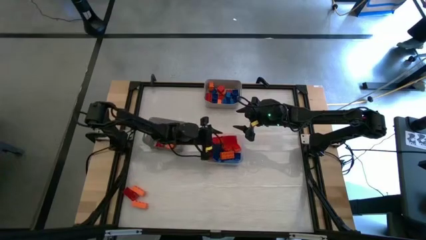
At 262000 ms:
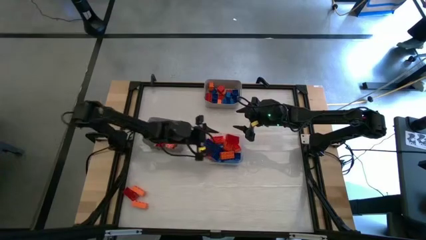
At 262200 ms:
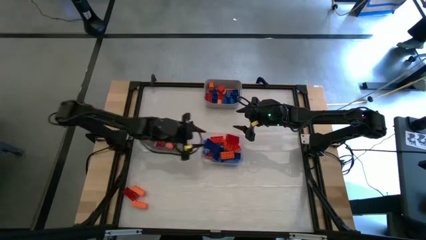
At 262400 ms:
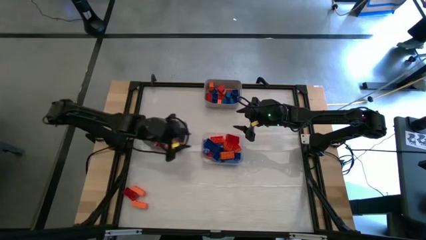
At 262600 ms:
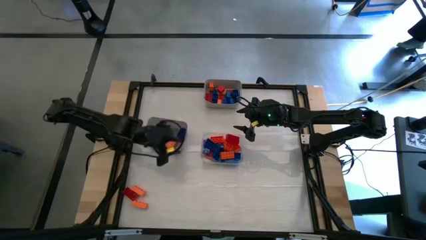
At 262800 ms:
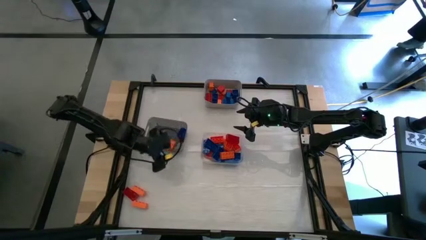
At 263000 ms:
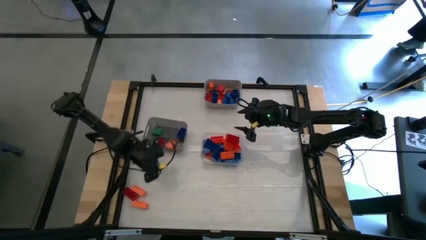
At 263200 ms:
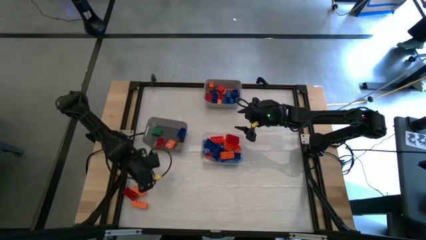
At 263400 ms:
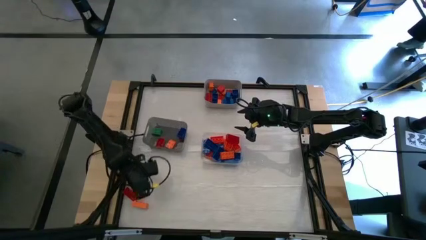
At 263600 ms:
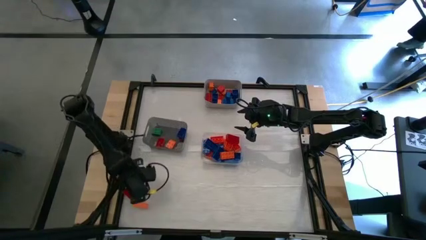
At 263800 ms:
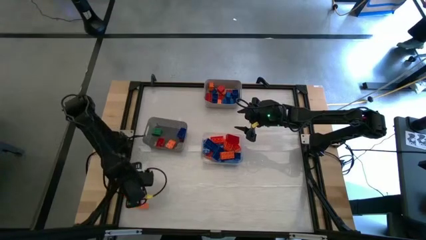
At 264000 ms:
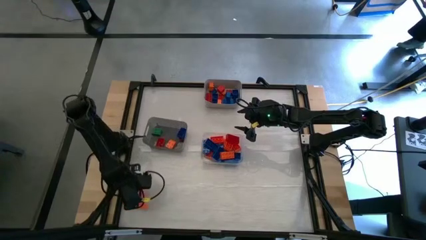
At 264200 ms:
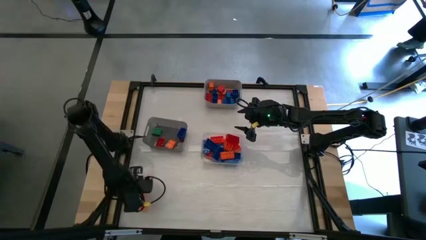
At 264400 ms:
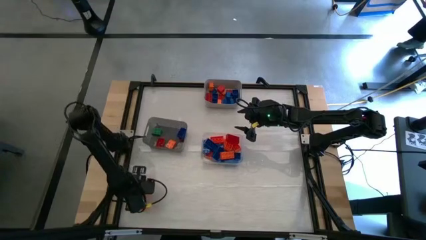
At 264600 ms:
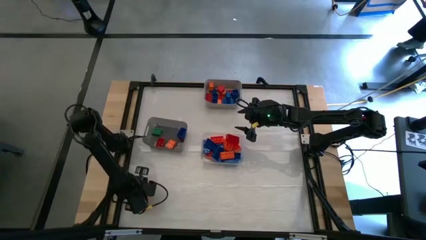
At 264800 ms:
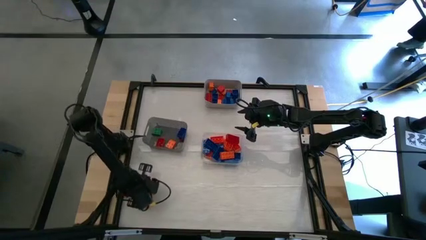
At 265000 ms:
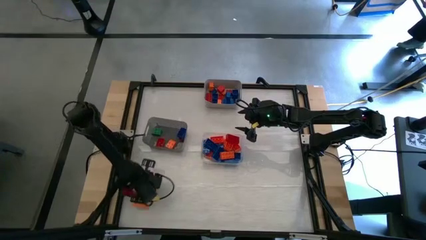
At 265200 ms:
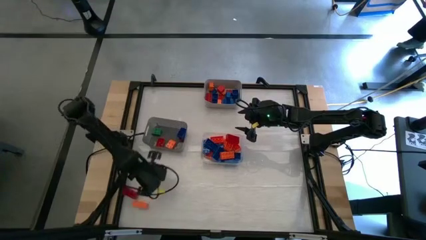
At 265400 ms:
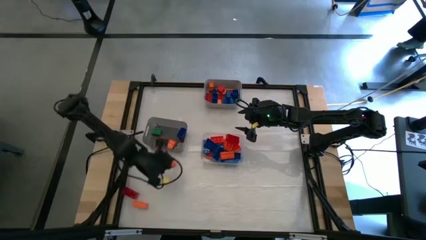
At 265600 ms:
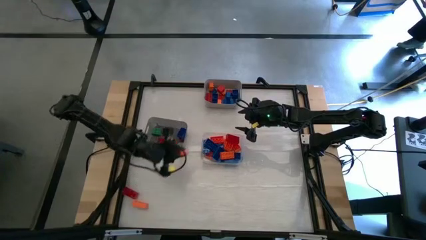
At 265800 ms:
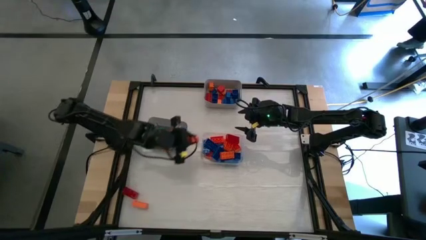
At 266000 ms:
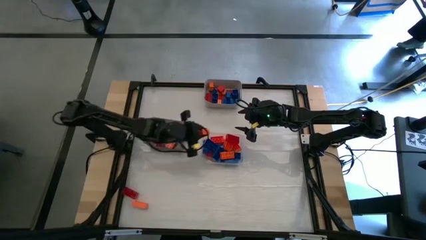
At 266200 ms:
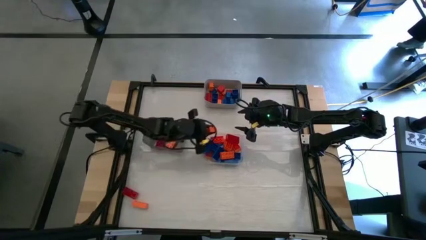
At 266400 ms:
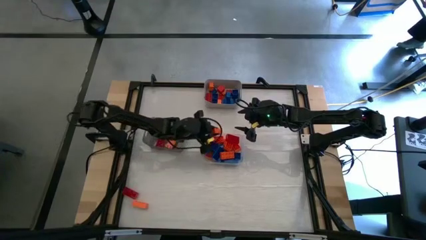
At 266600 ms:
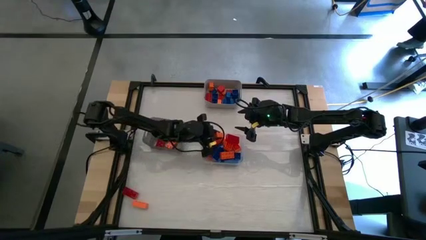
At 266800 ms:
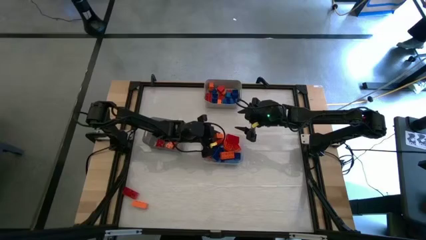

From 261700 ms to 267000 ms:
Task: Sort blocks by size
Put the big orange game piece into the transparent bin

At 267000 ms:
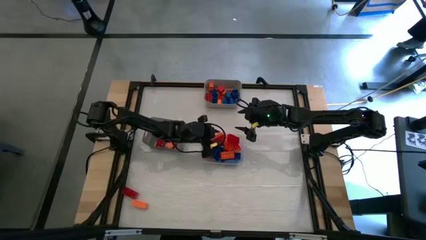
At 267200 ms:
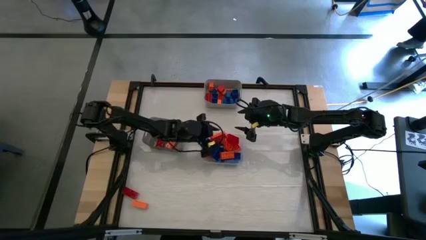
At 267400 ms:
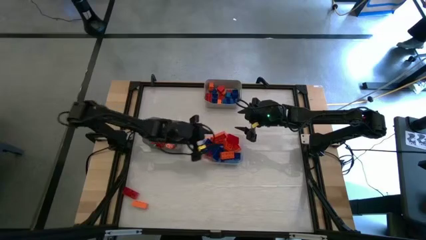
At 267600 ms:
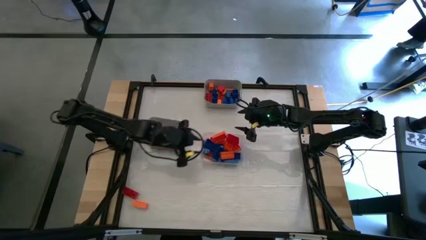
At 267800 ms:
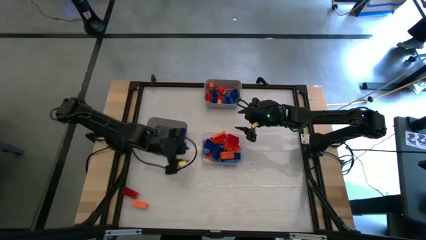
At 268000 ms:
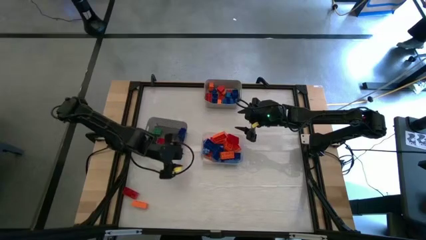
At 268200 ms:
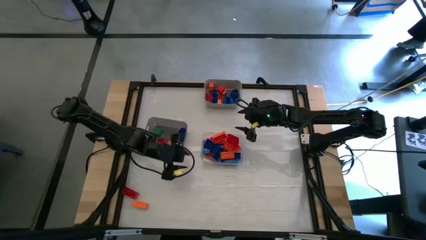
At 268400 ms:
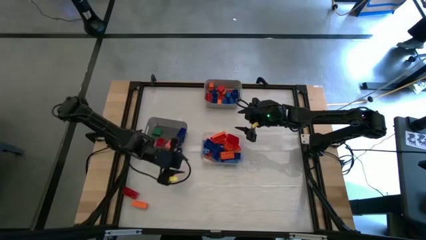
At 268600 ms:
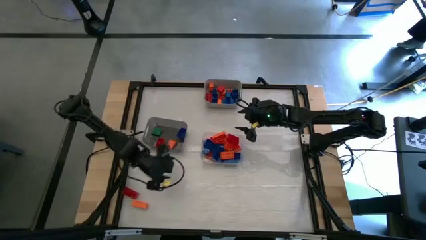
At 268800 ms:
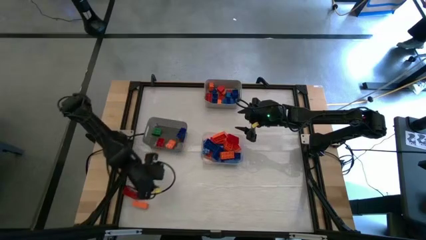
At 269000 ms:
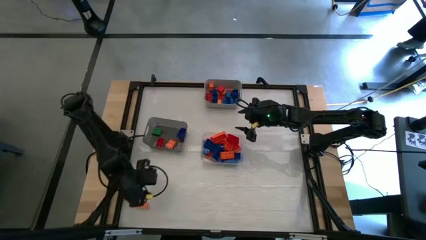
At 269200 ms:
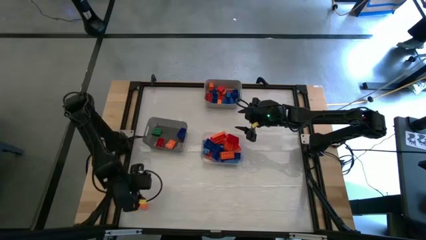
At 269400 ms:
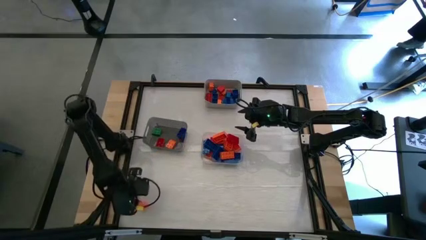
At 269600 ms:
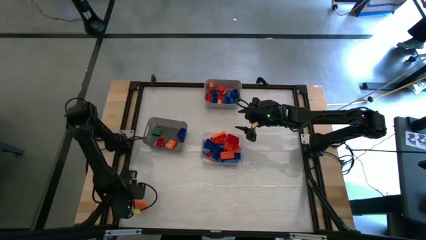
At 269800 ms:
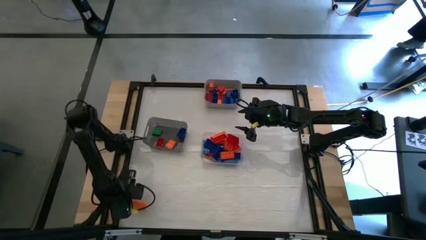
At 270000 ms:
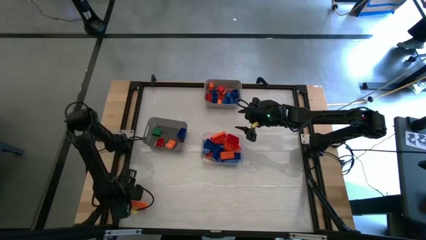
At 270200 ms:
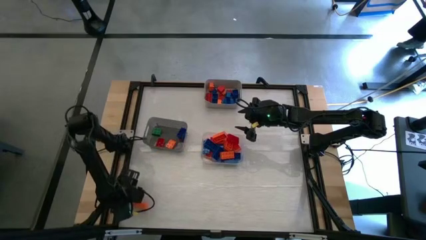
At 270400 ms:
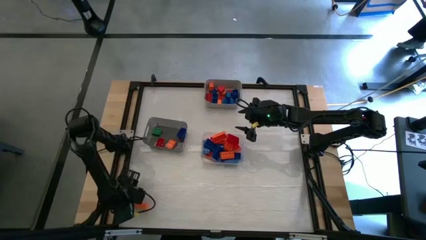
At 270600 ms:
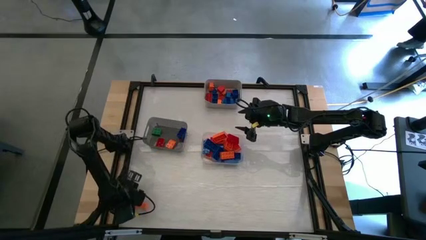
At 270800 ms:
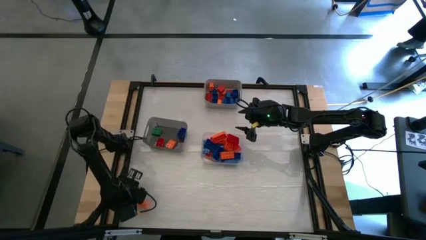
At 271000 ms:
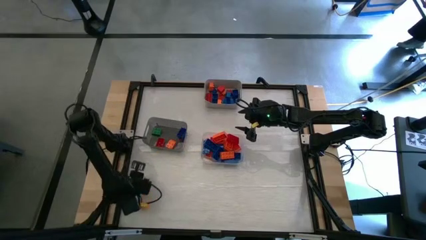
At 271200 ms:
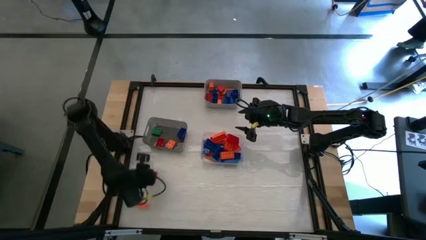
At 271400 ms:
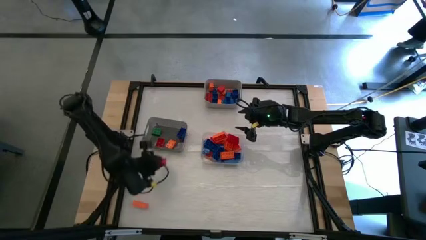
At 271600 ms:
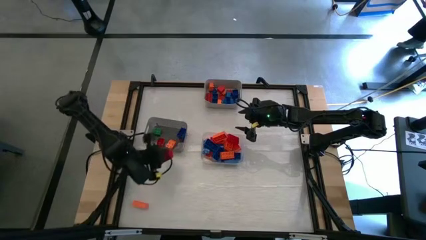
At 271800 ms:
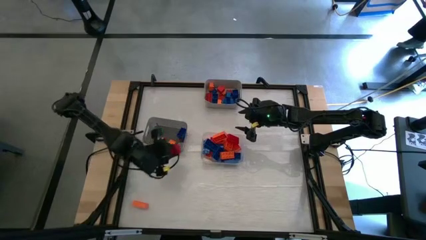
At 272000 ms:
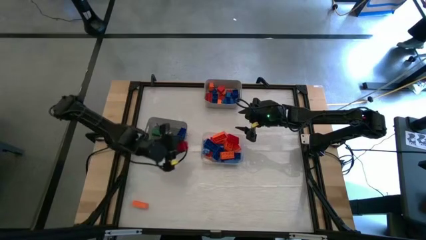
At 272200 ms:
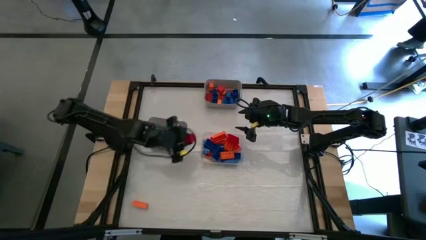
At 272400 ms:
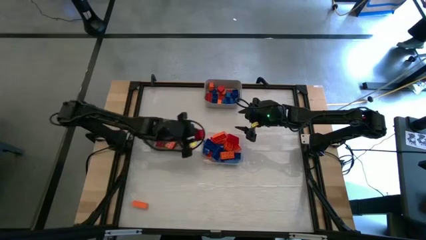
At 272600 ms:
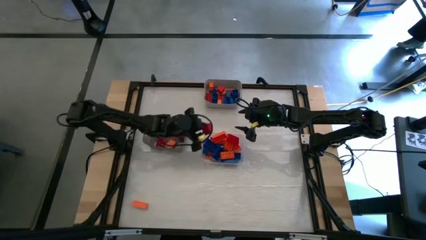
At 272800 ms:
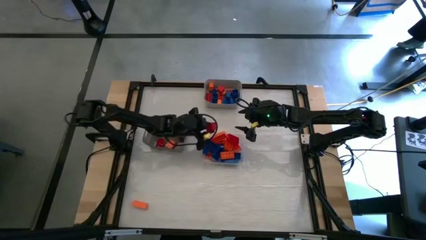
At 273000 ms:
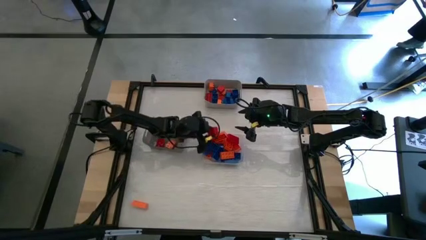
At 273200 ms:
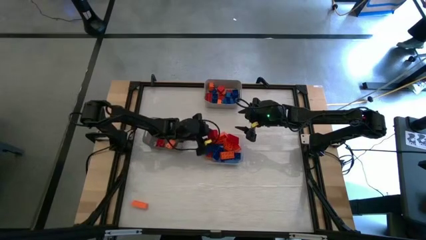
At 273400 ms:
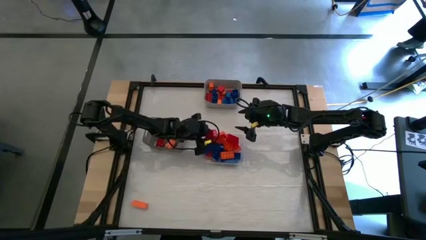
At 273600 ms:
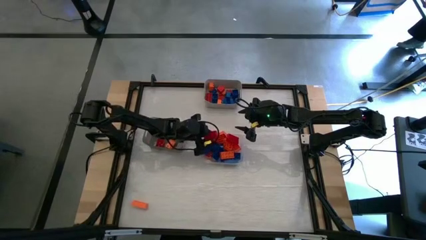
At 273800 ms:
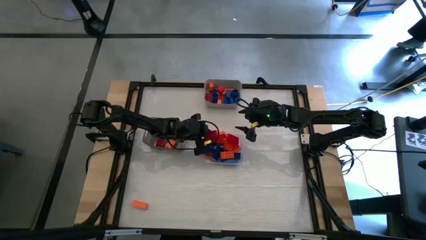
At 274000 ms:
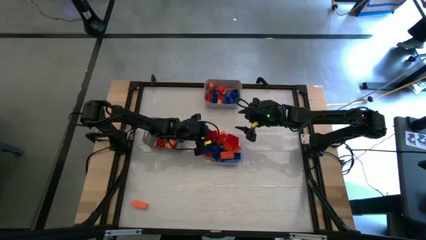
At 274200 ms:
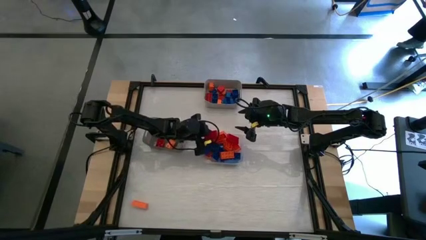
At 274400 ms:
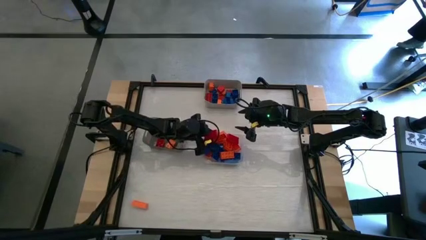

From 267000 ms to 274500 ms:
Put the big red game piece into the transparent bin

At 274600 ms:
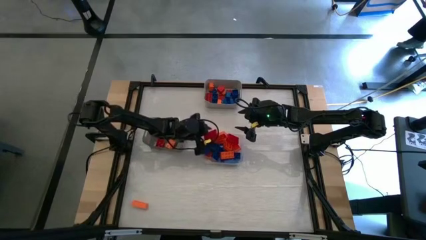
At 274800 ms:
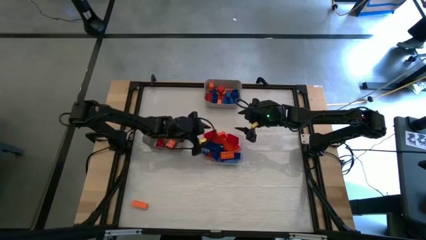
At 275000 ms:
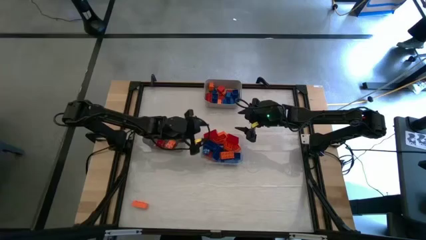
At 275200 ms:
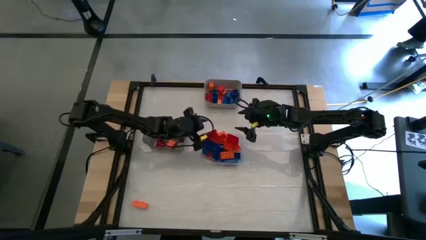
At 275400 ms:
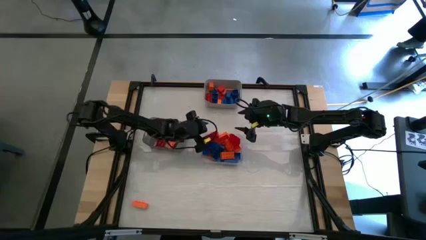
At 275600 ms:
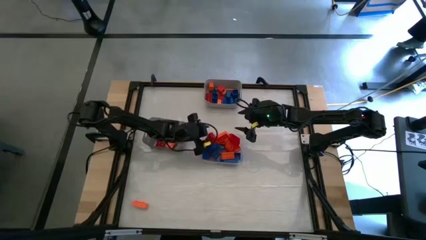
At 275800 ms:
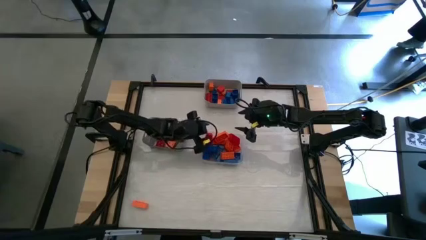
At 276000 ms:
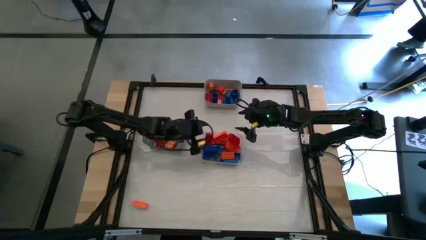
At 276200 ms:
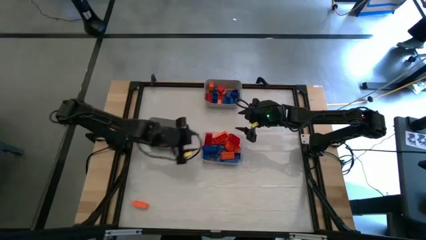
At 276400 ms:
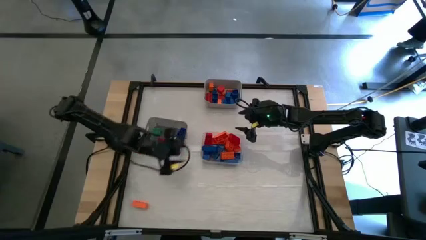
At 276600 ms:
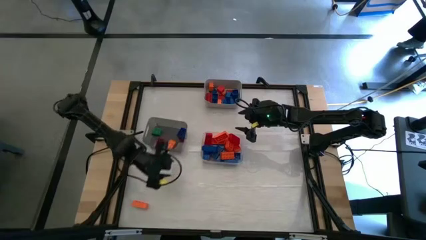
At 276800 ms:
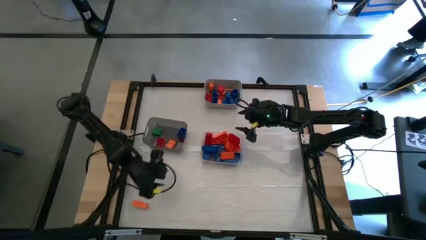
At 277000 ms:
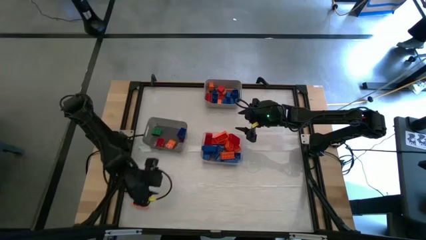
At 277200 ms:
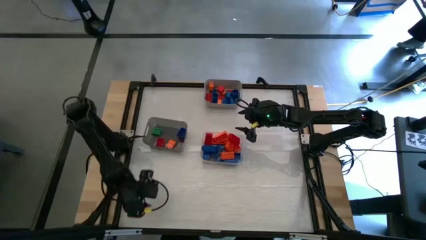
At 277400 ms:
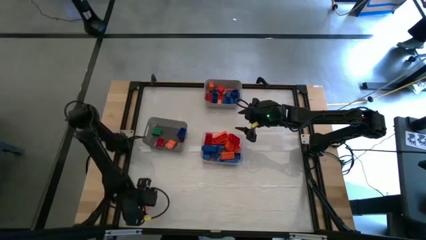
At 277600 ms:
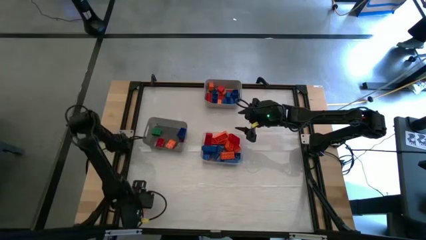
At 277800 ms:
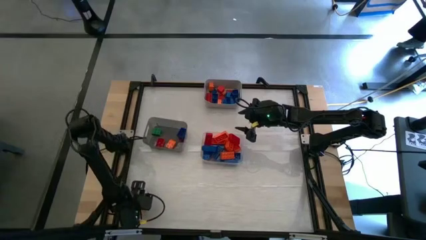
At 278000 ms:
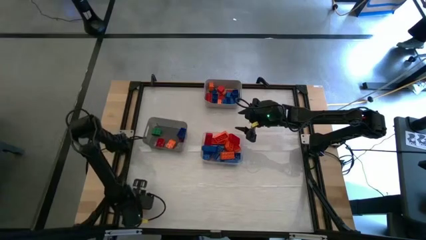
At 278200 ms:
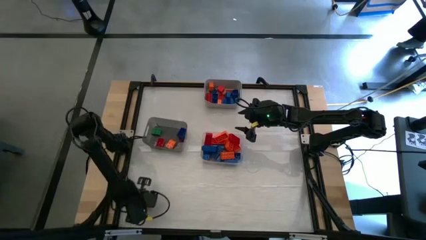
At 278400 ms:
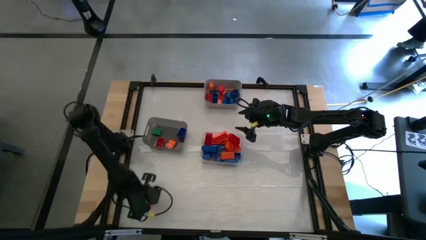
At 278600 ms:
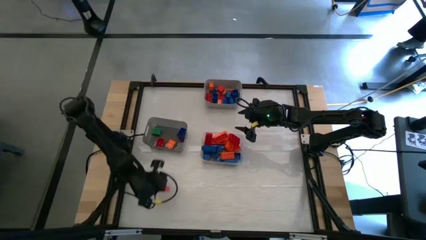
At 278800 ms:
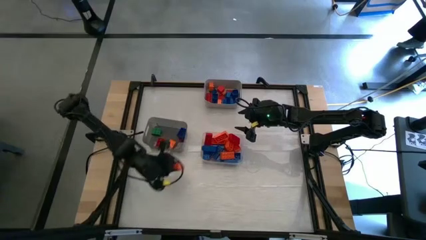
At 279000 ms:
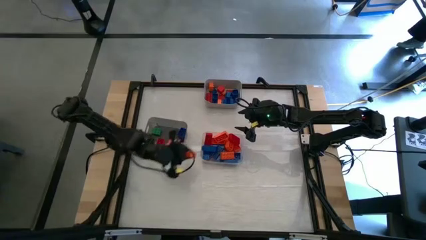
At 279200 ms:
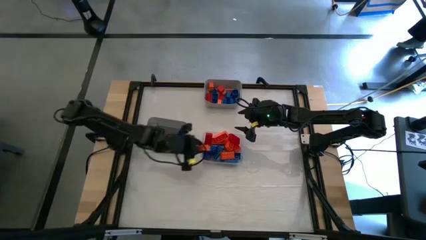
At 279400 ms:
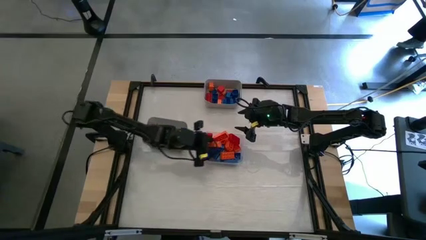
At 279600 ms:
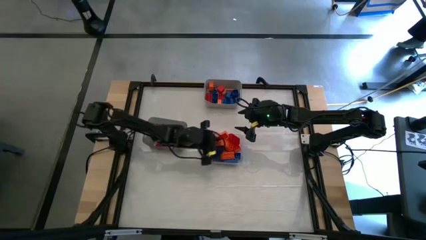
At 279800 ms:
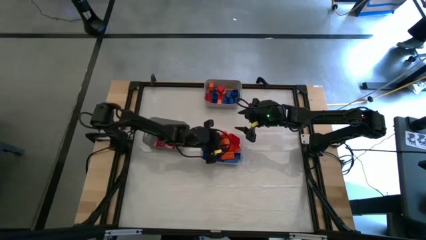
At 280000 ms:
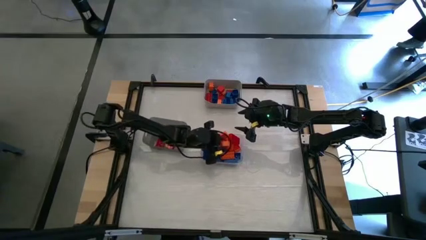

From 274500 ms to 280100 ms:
Put the big orange game piece into the transparent bin
